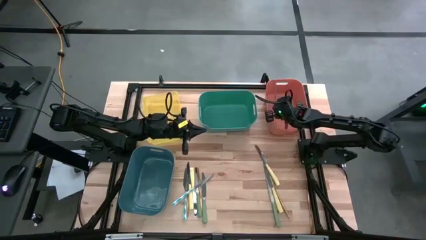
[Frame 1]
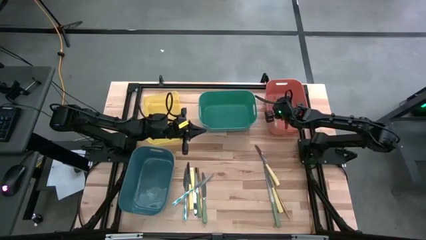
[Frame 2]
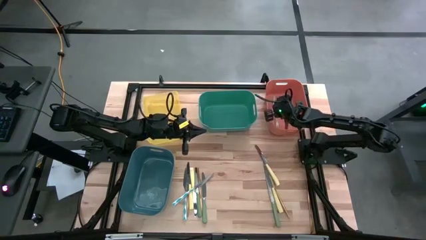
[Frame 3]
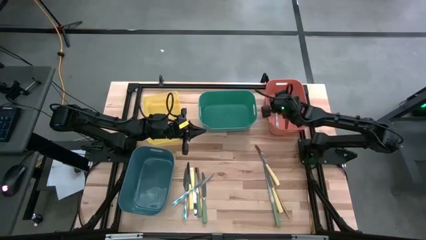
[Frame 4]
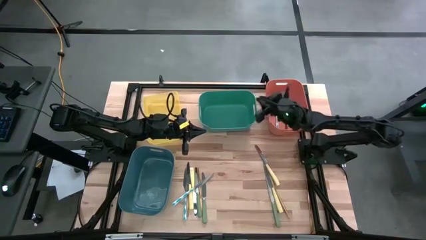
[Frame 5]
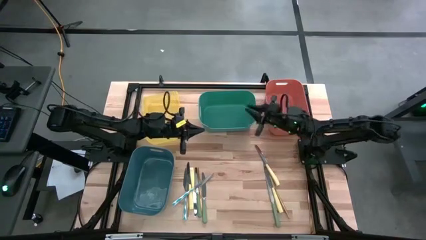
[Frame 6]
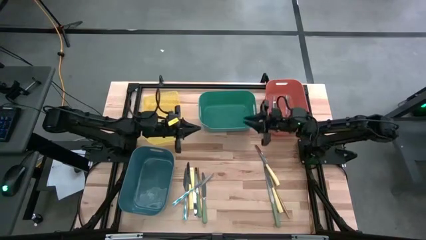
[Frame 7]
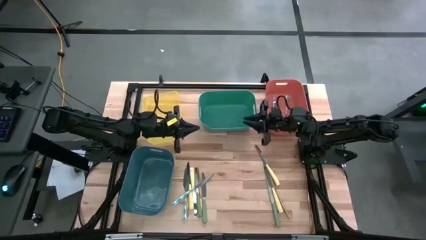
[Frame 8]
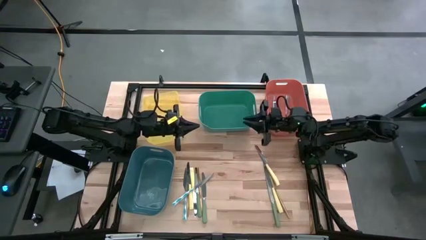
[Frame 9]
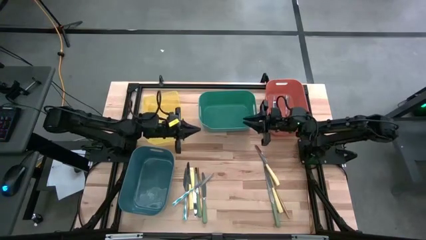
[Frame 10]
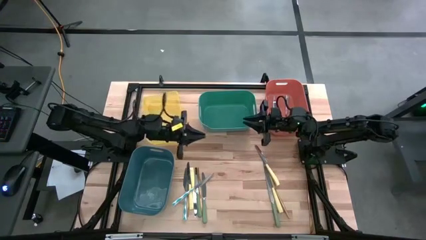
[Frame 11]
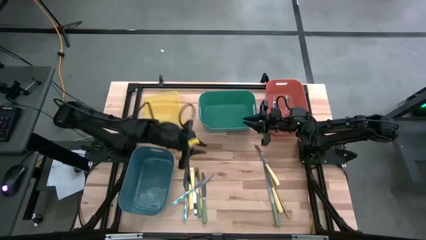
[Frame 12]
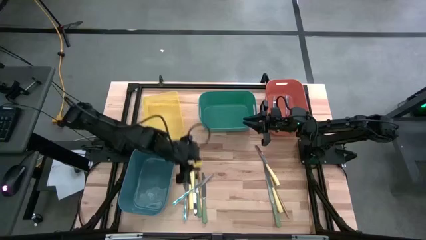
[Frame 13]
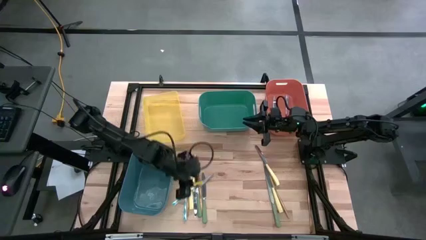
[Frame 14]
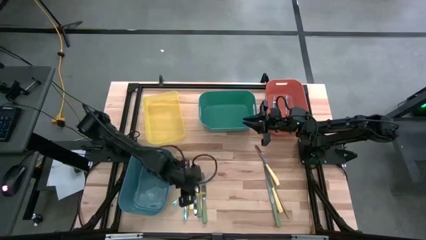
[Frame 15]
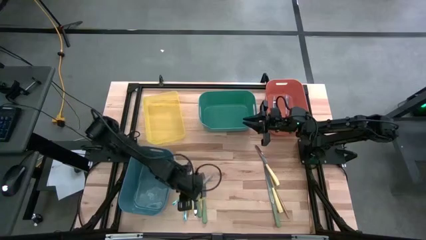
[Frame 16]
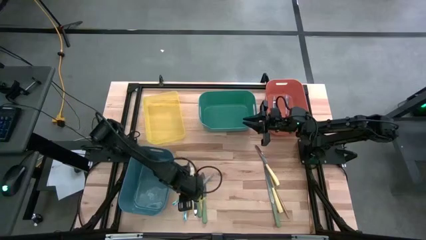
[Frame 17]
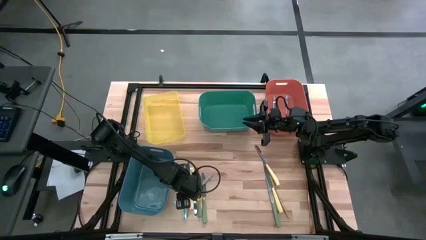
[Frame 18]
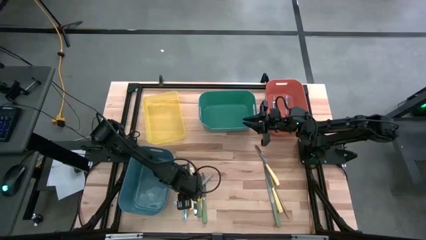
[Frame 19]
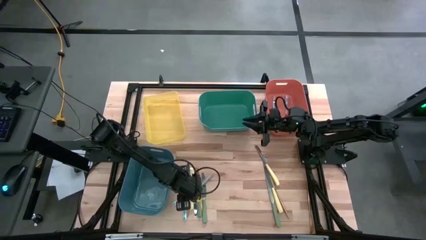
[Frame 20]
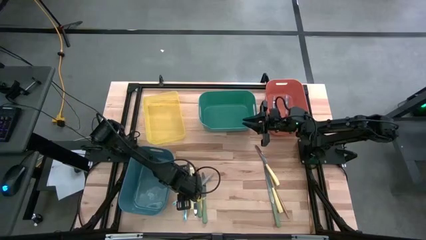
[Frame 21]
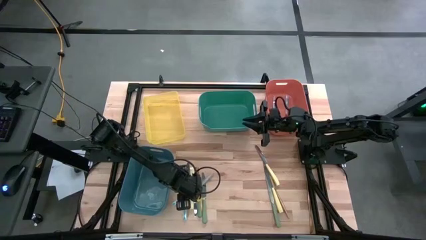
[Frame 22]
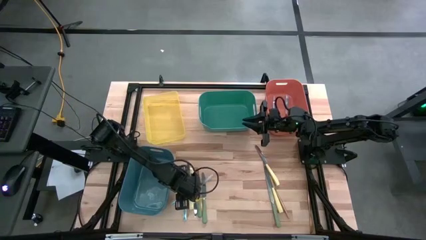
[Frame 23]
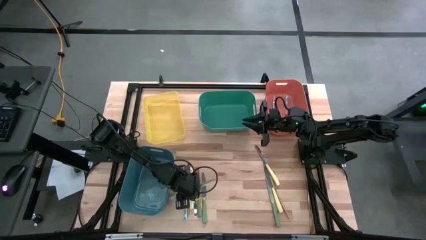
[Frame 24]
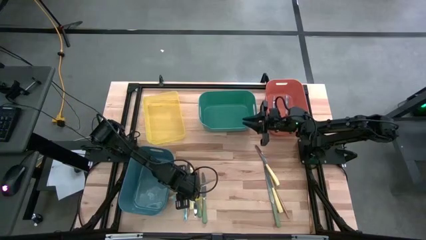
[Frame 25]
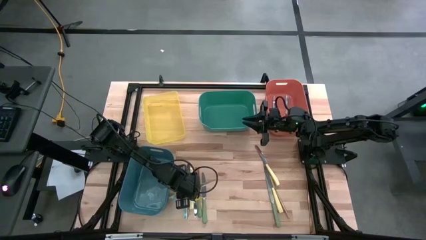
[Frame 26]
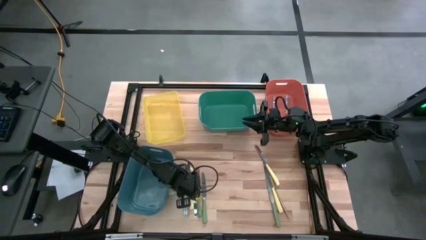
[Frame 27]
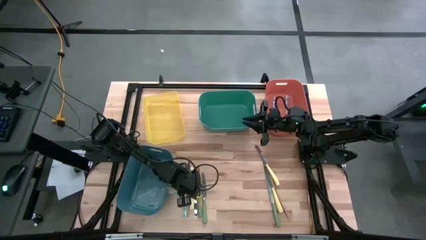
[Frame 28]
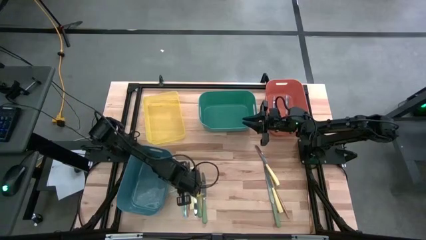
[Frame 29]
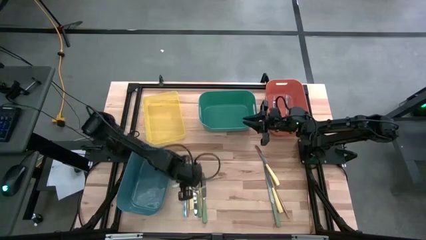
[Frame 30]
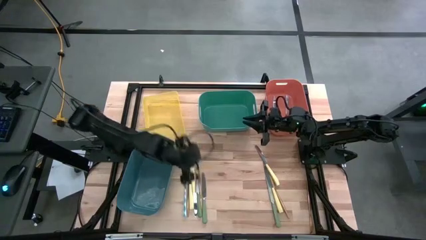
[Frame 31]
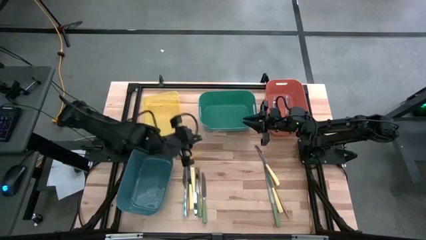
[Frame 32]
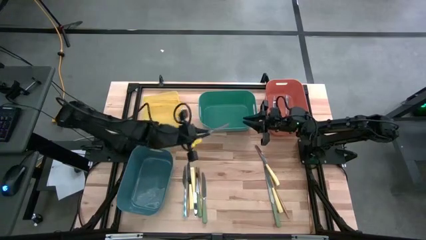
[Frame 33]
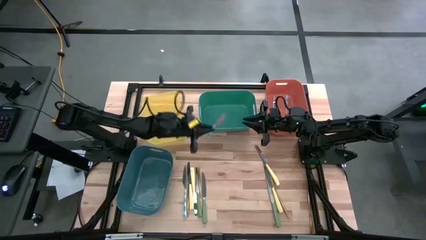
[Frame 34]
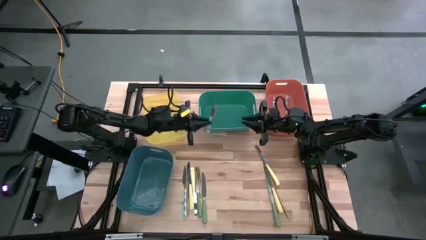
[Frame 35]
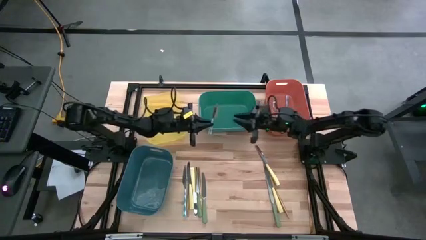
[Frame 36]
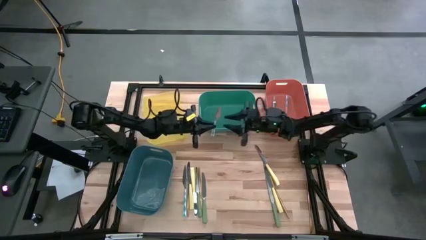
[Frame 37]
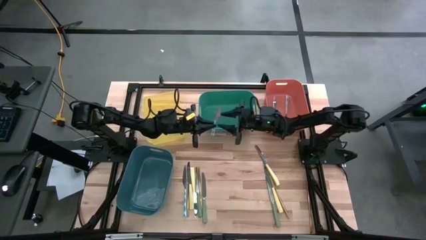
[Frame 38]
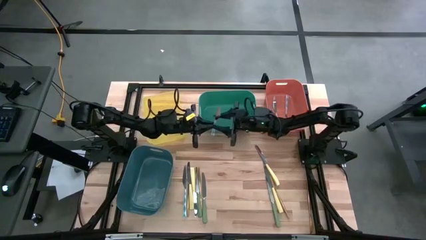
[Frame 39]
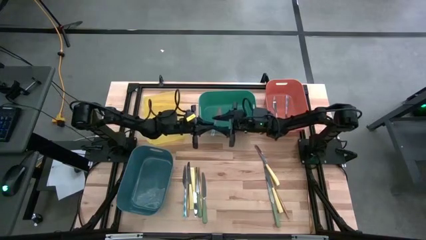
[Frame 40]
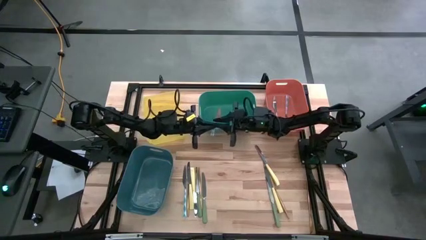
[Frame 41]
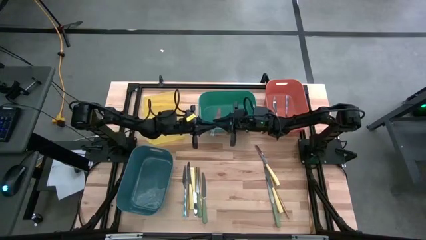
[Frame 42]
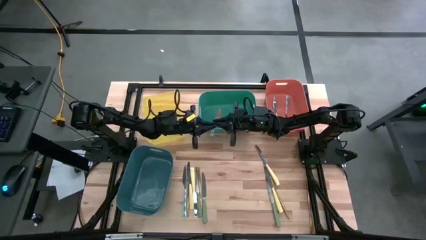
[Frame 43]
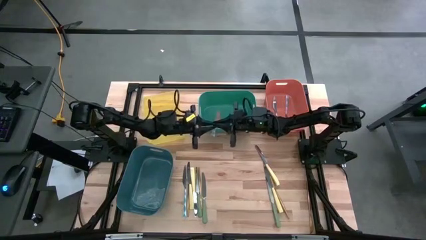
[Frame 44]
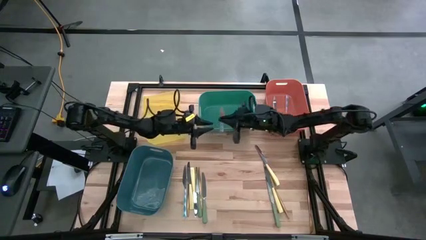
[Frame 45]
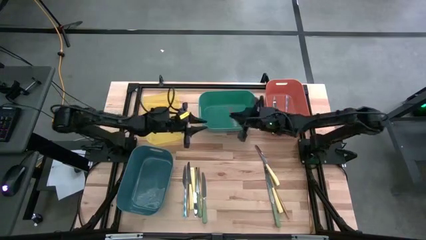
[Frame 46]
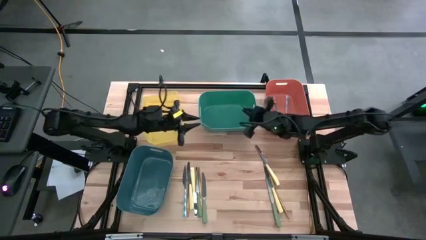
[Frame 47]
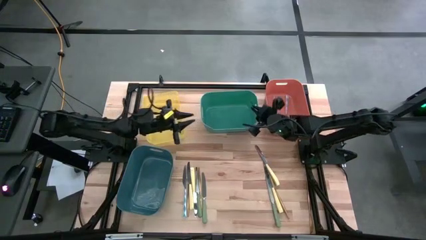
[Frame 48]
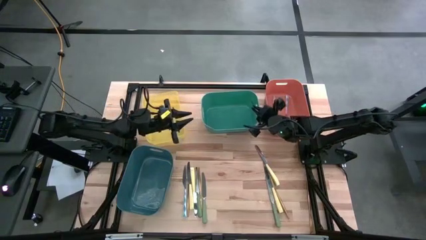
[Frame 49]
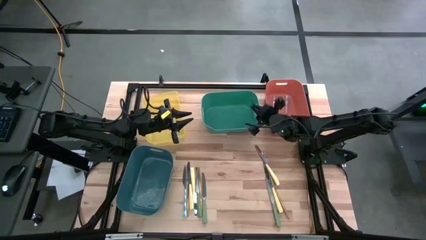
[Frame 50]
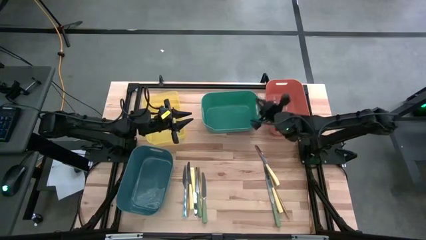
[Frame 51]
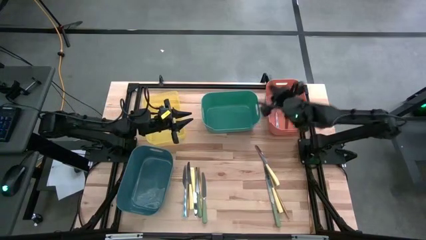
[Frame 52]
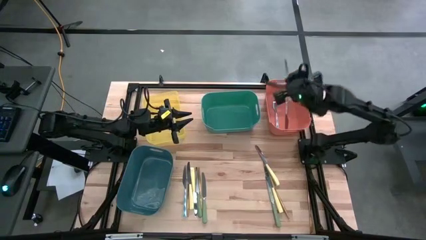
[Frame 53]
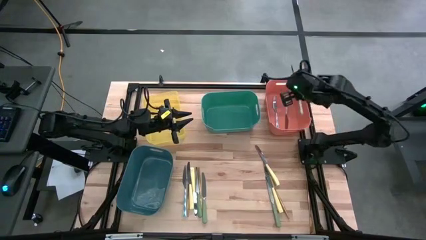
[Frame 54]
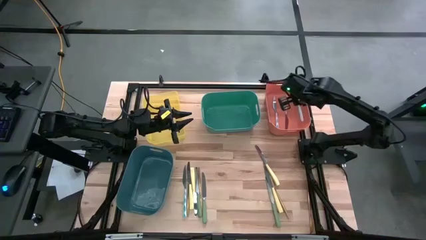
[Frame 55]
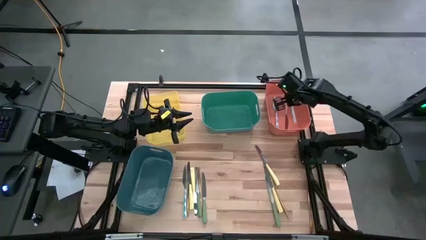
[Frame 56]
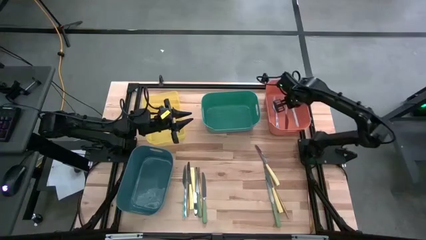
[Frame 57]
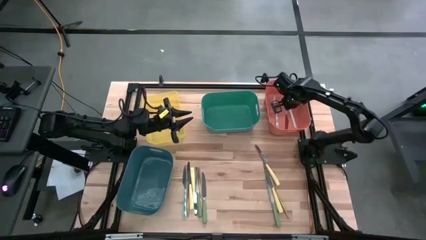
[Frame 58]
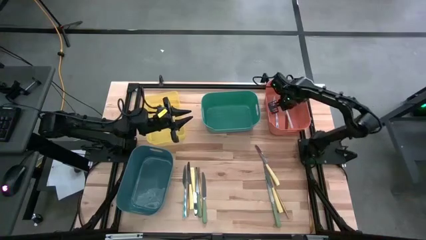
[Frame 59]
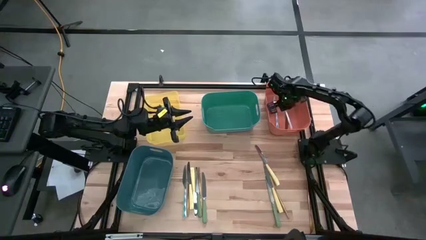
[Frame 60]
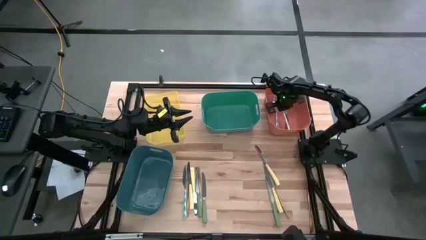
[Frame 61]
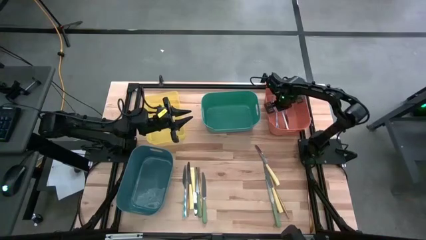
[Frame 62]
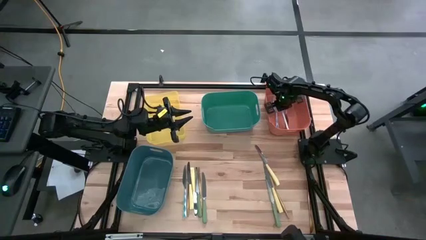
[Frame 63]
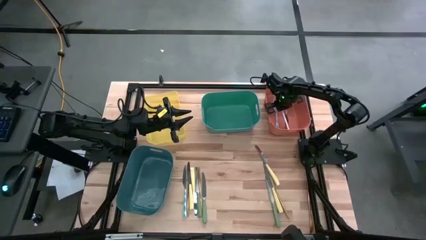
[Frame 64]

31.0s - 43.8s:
Task: Sort silverware by color (type)
Put the blue patterned knife into the orange bin
